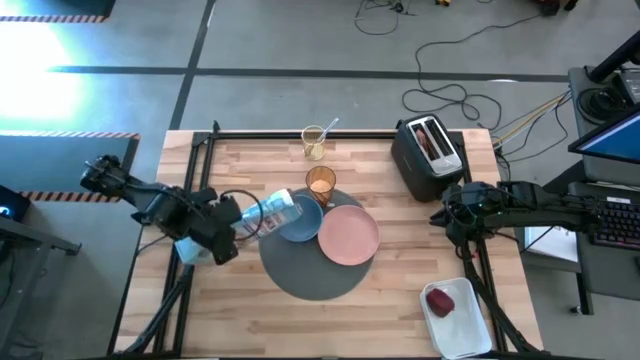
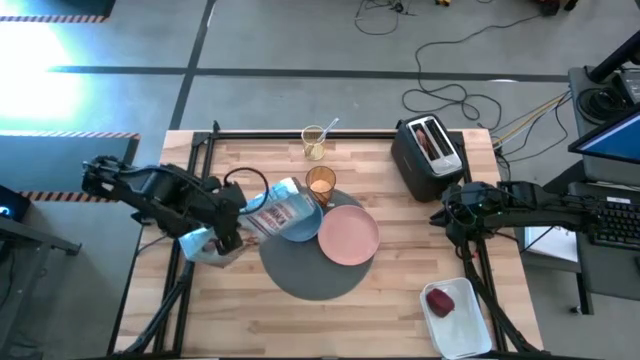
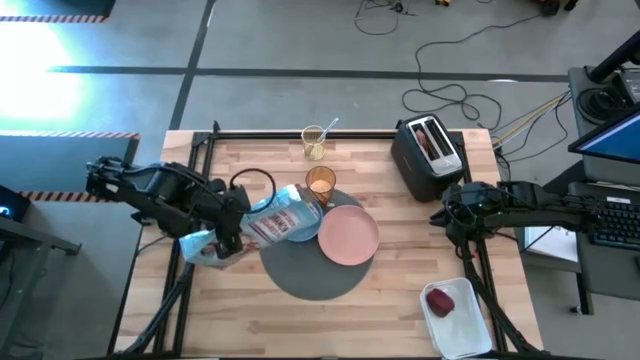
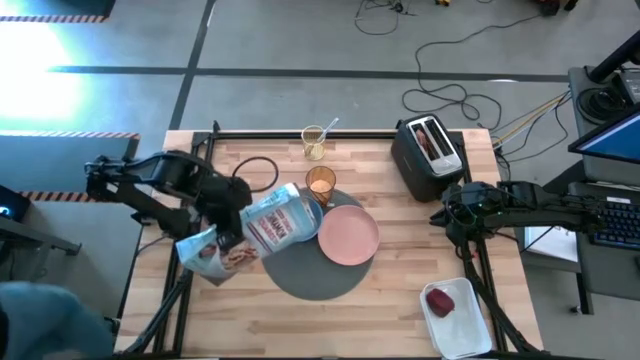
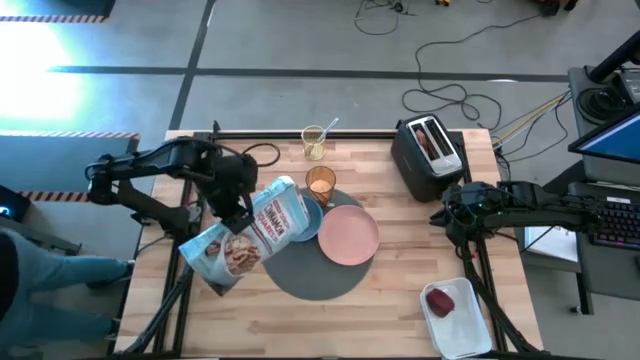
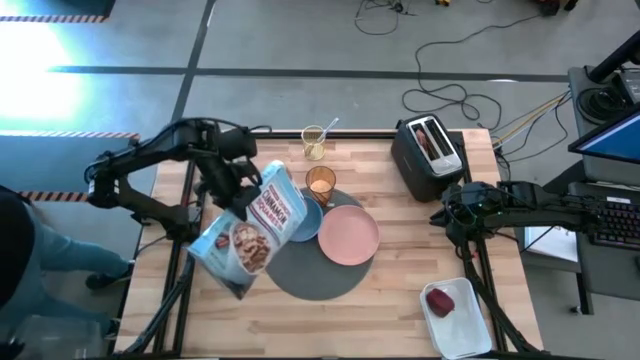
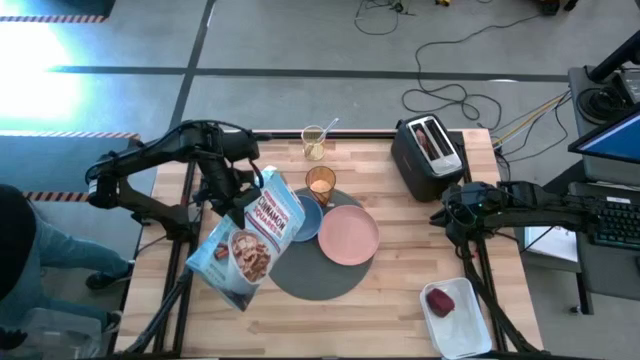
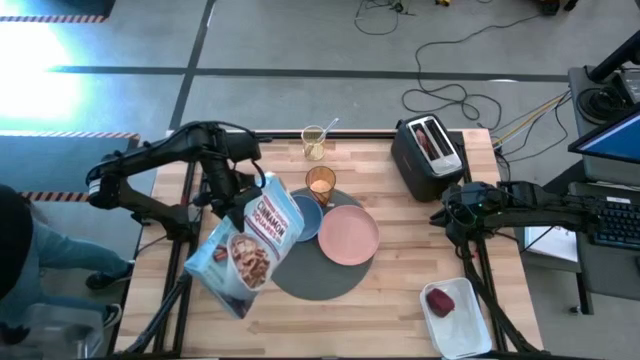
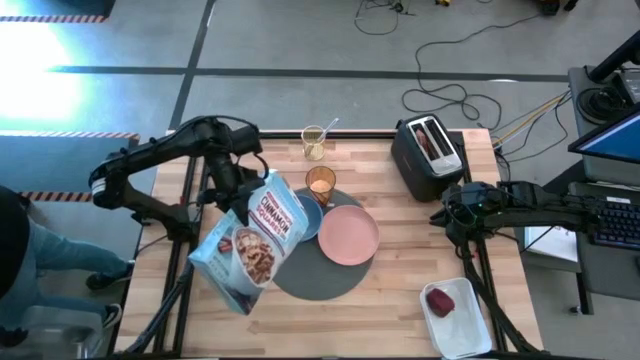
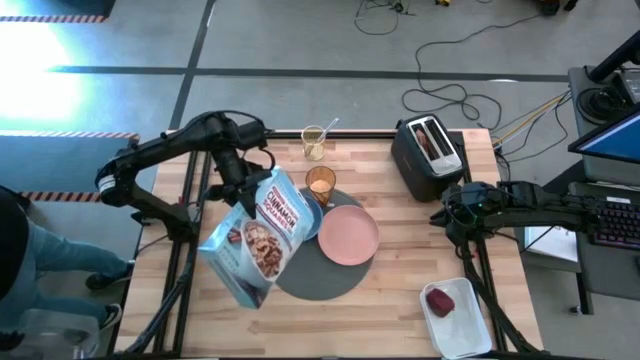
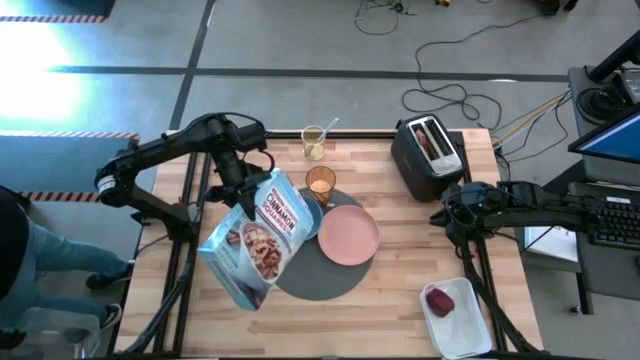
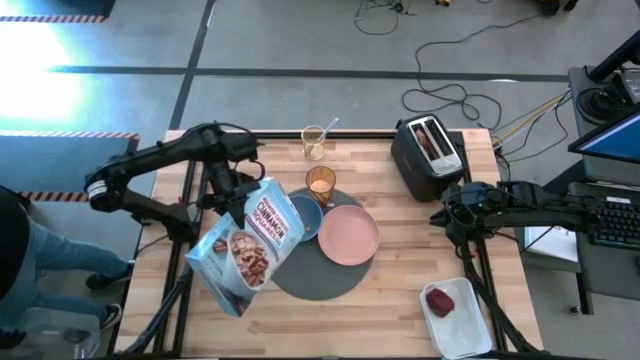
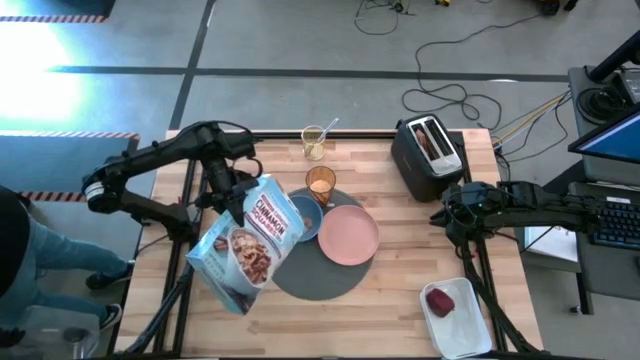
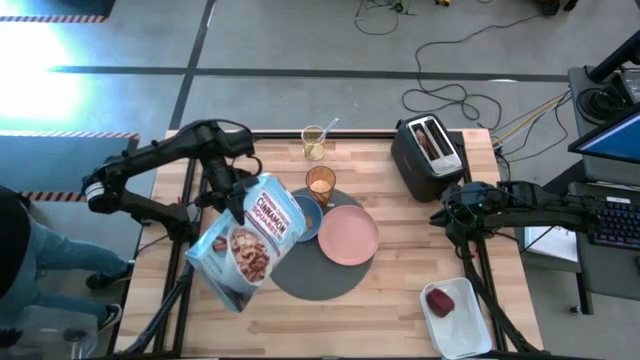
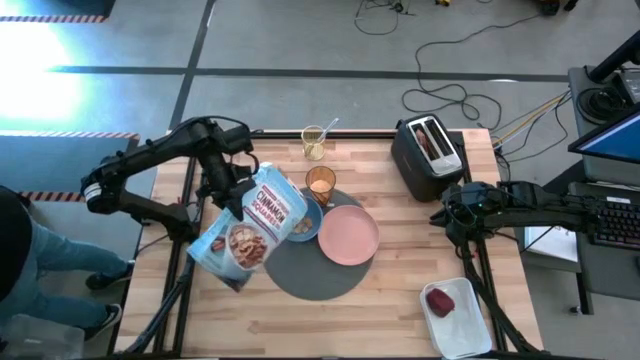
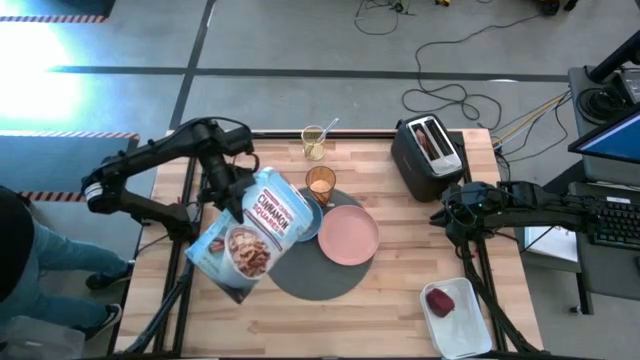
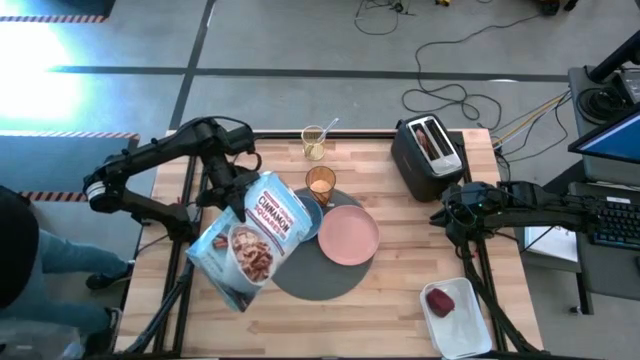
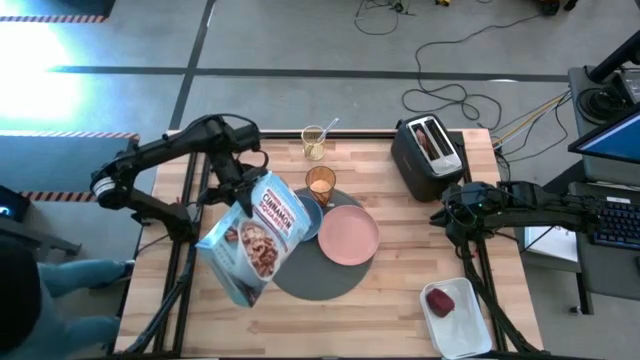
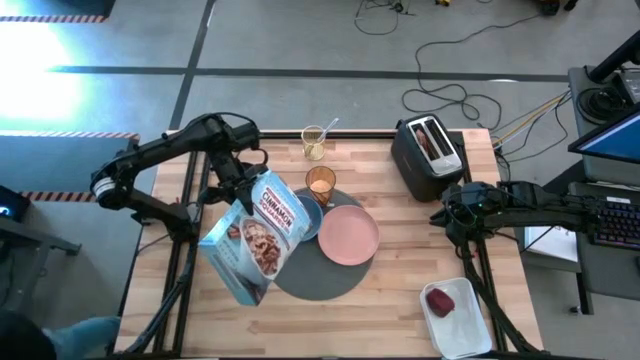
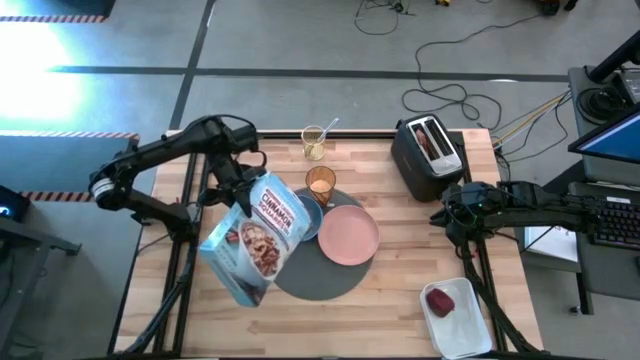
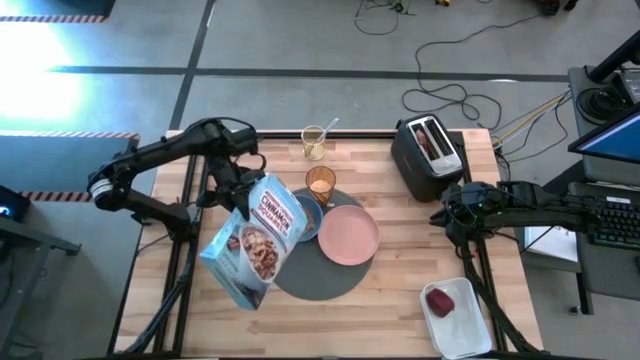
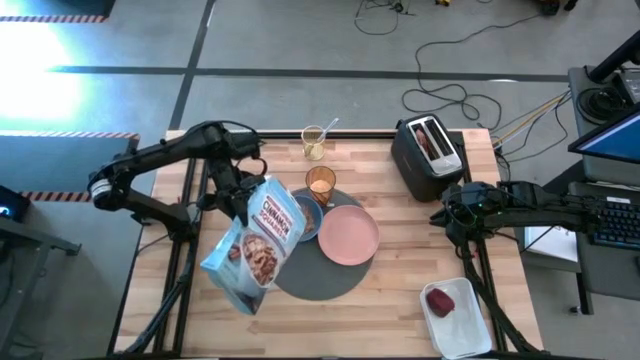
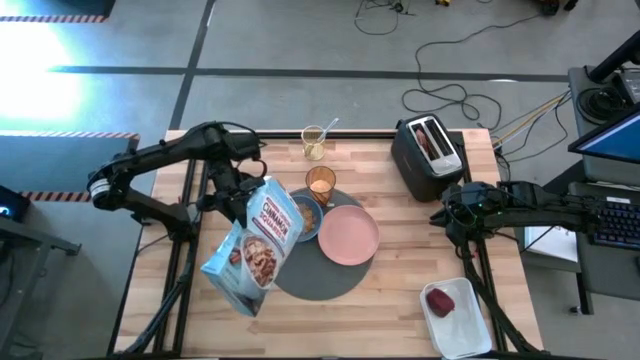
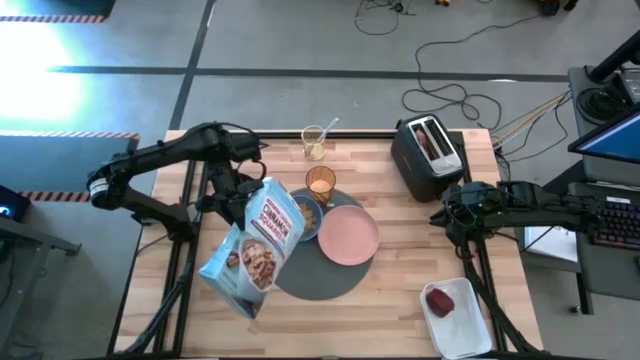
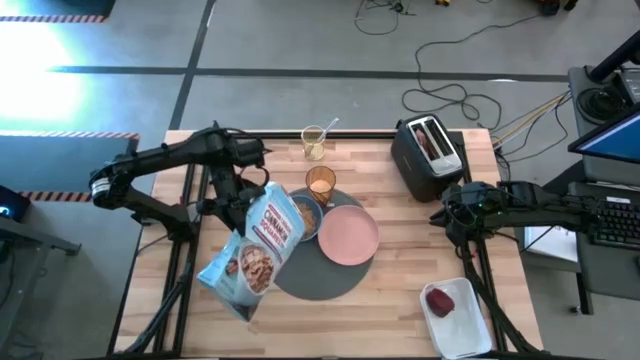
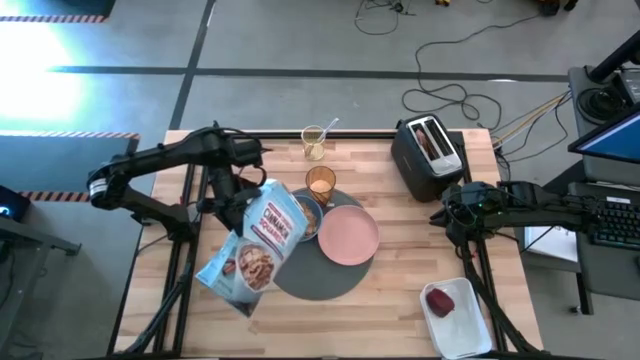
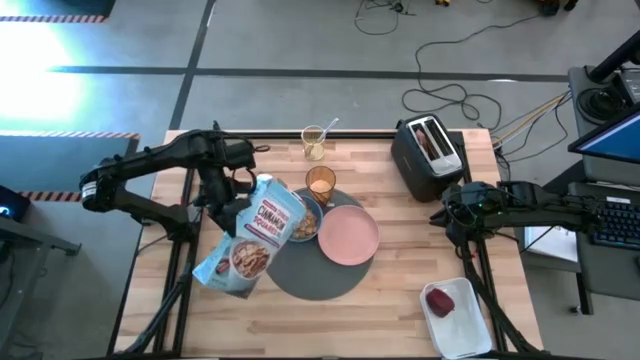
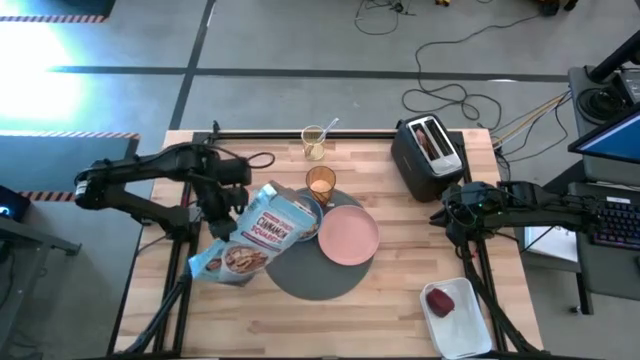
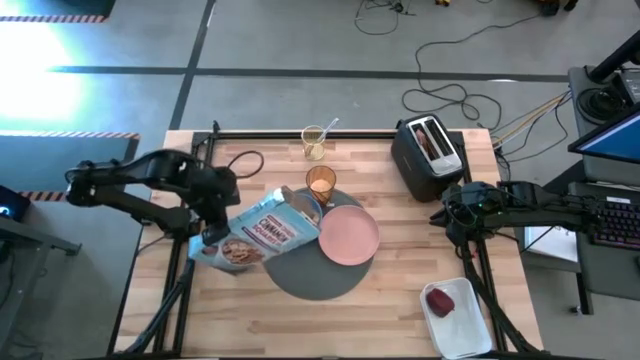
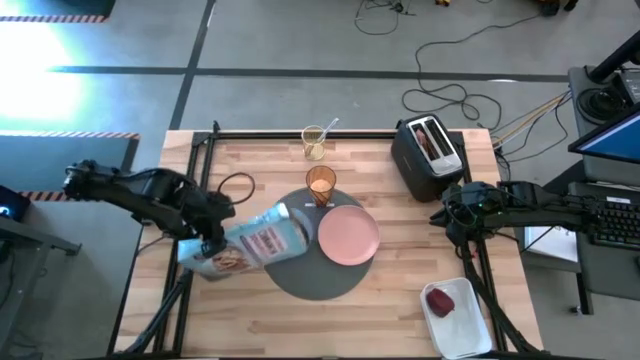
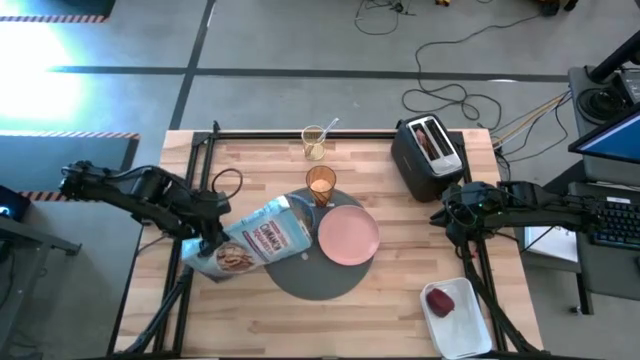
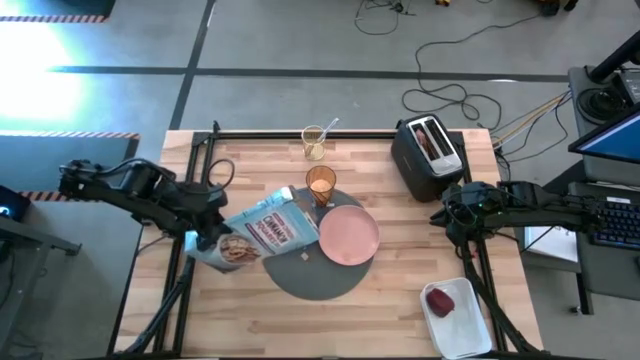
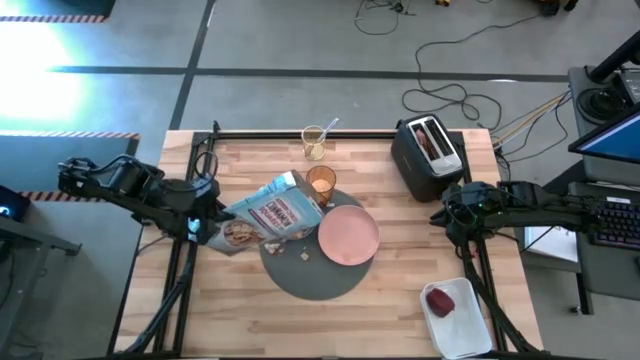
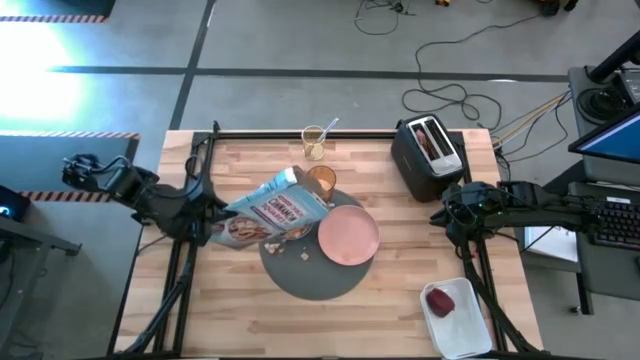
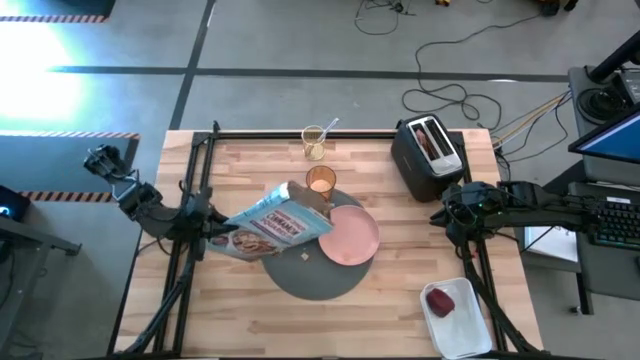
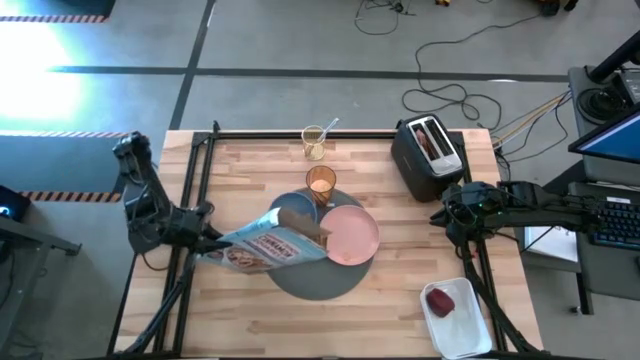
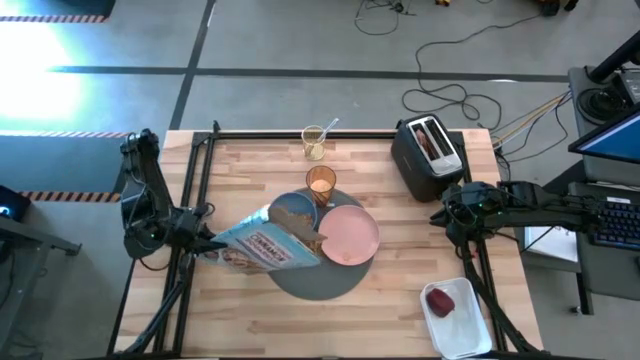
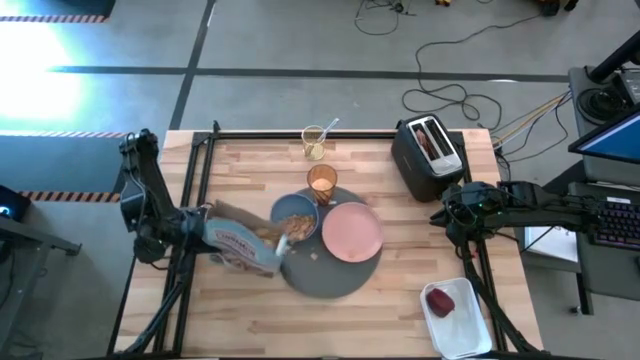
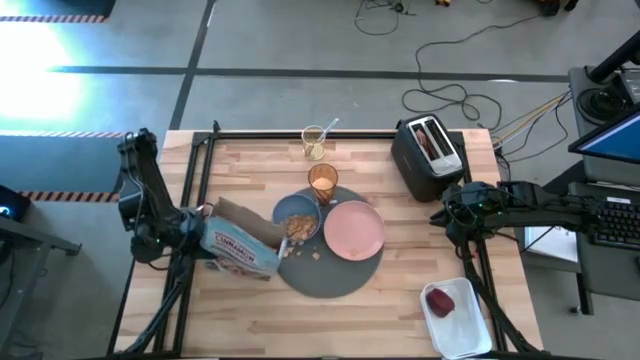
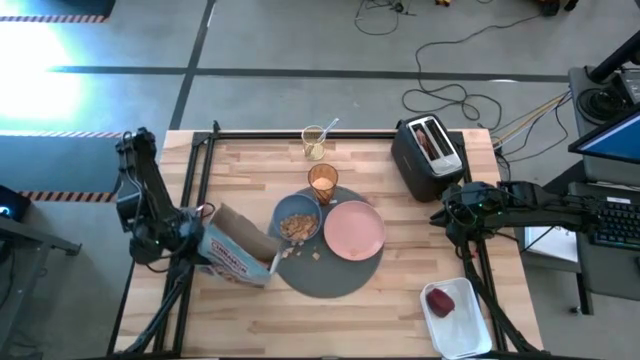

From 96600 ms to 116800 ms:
Task: Arrange a breakfast setting
Pour the cereal box into the blue bowl
